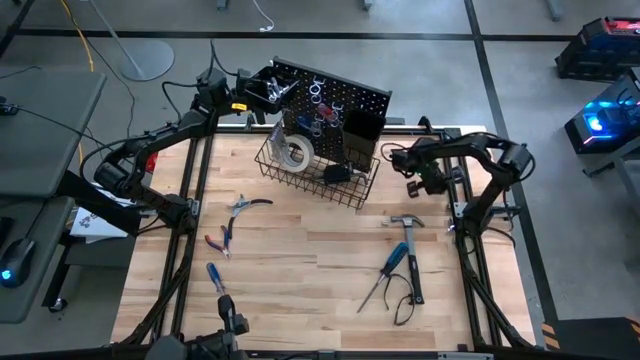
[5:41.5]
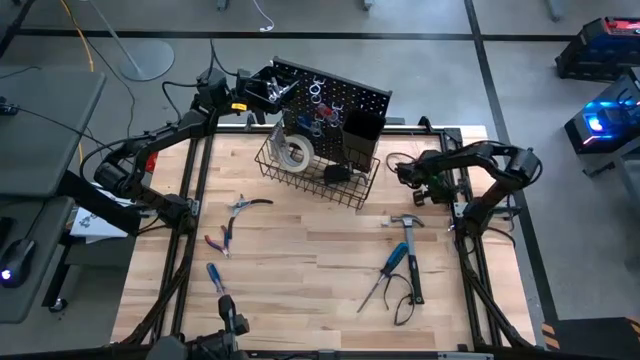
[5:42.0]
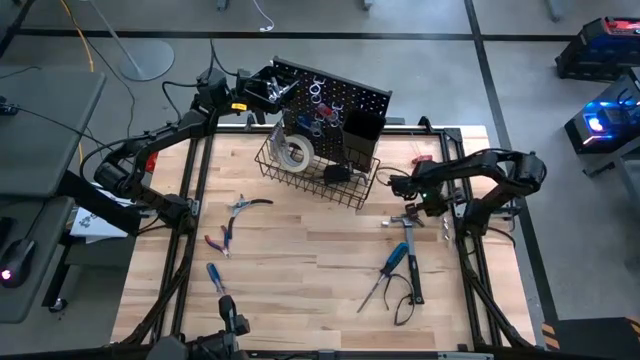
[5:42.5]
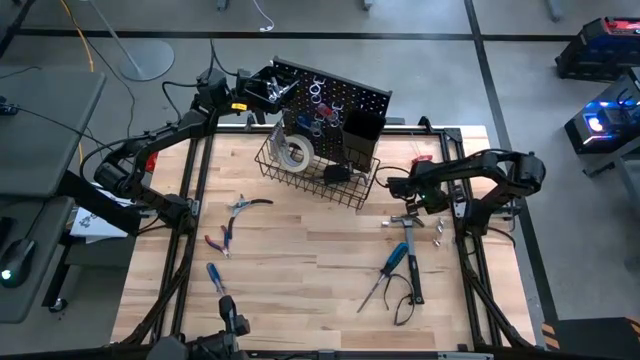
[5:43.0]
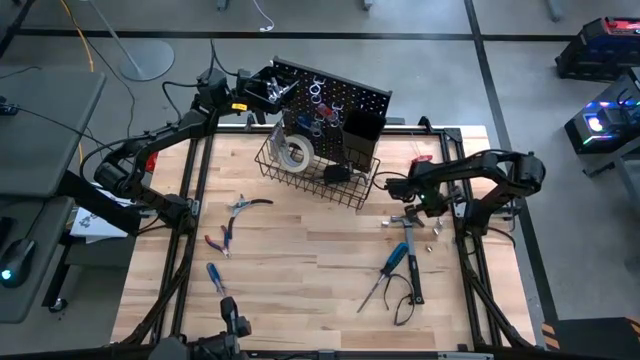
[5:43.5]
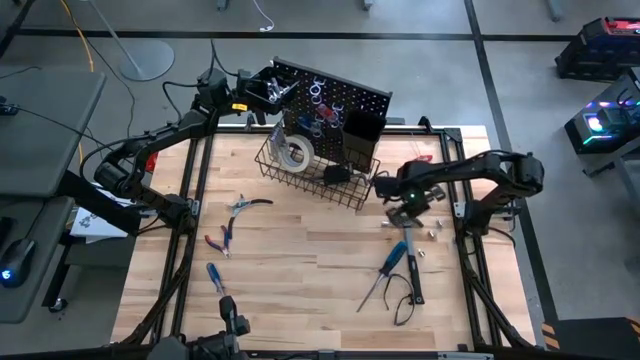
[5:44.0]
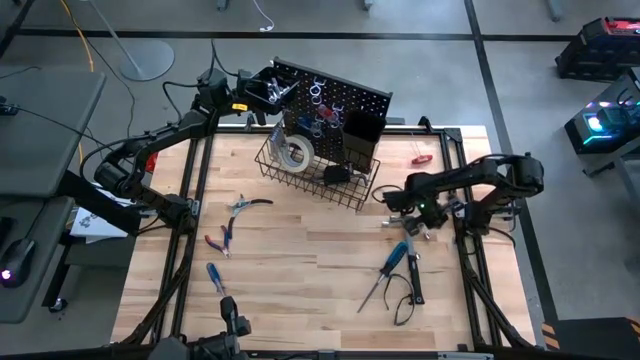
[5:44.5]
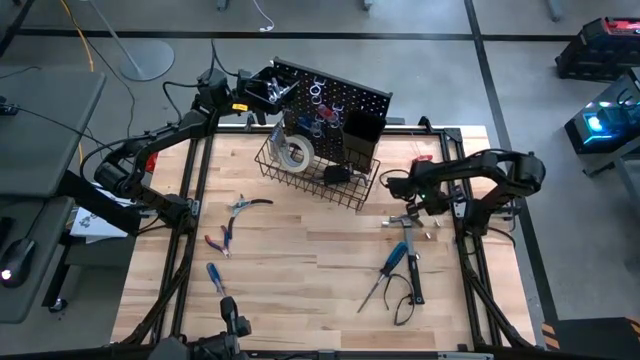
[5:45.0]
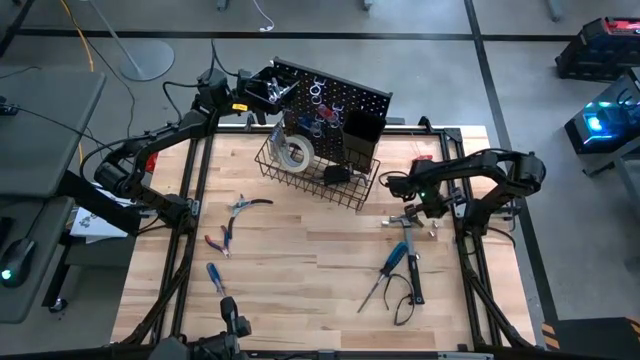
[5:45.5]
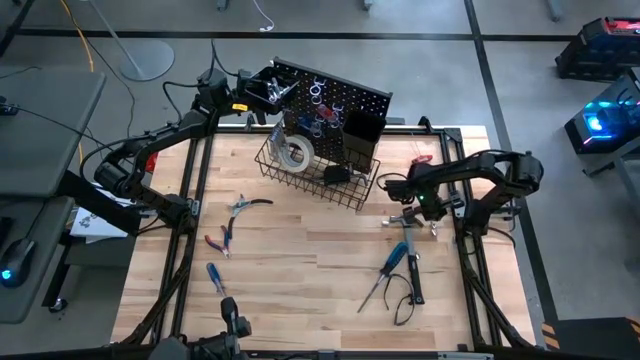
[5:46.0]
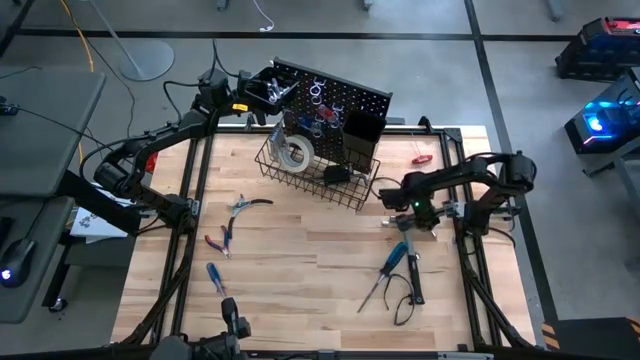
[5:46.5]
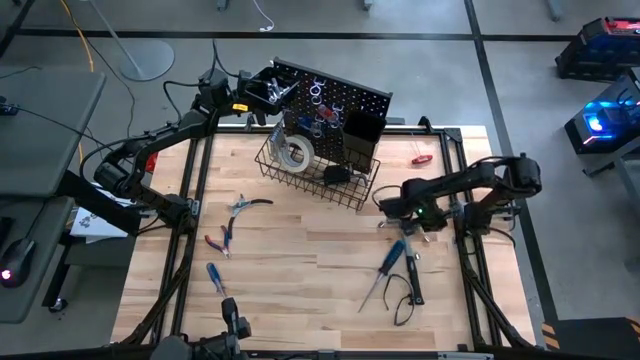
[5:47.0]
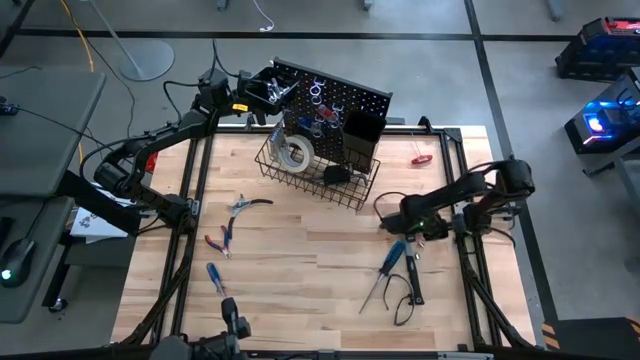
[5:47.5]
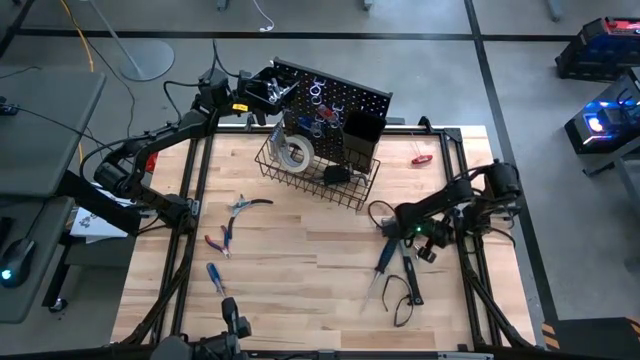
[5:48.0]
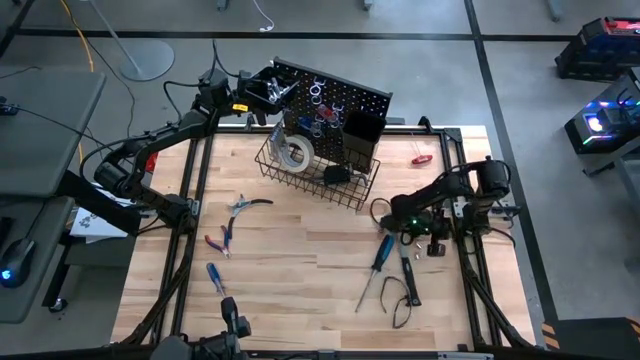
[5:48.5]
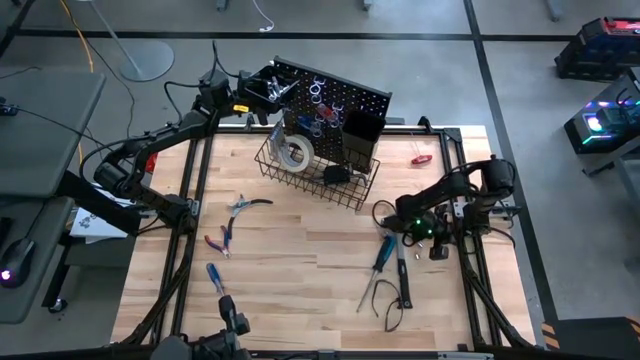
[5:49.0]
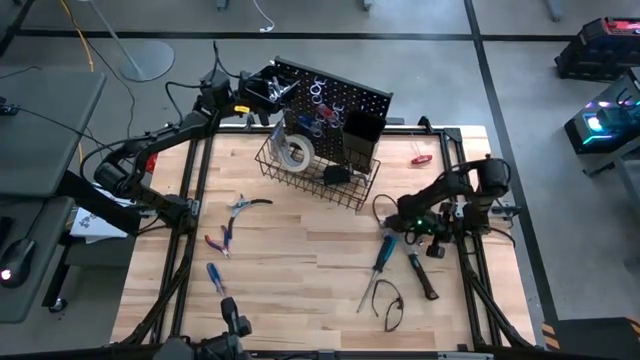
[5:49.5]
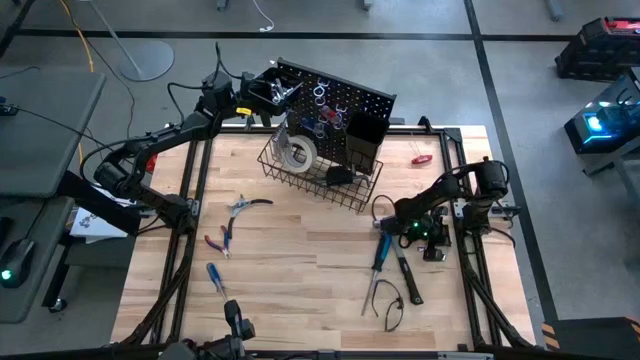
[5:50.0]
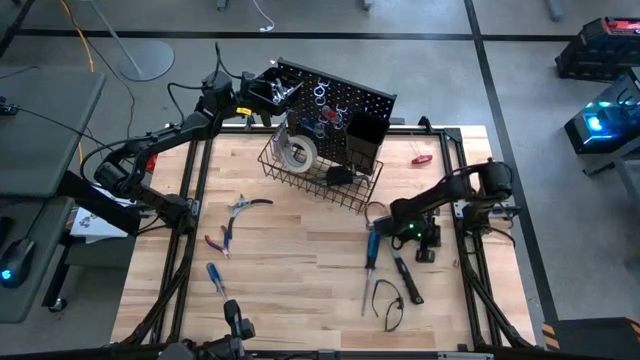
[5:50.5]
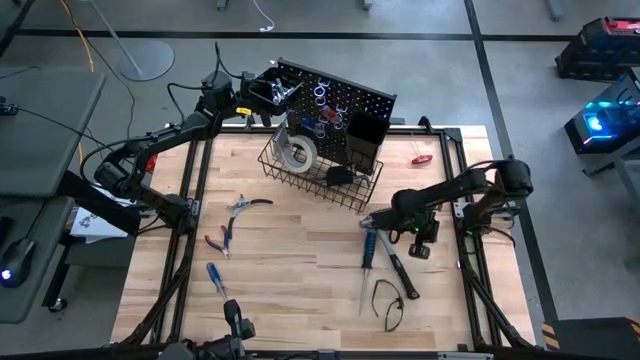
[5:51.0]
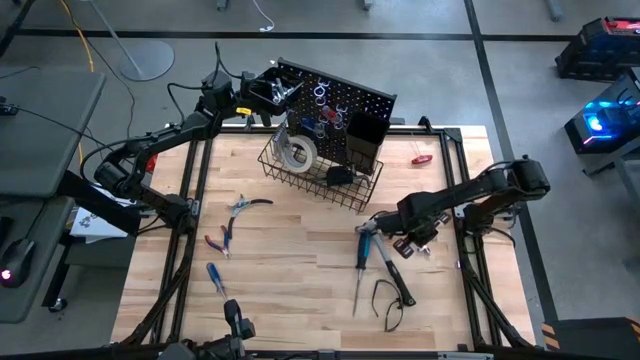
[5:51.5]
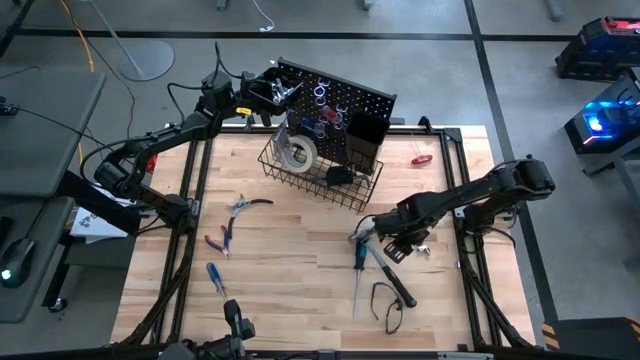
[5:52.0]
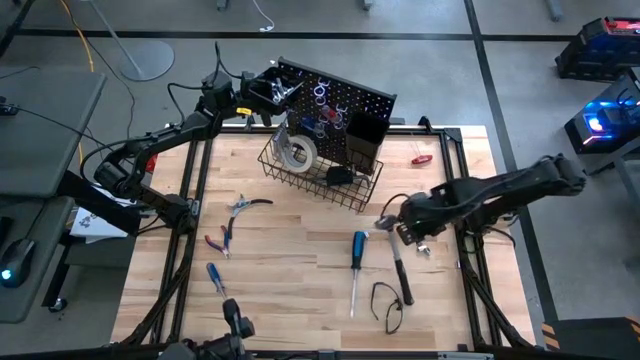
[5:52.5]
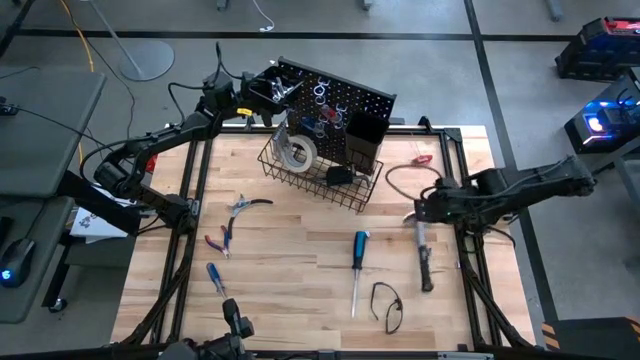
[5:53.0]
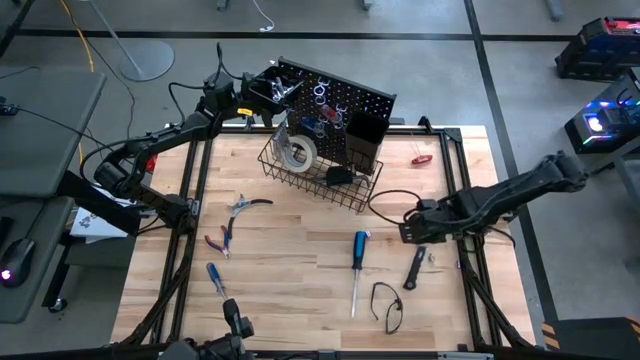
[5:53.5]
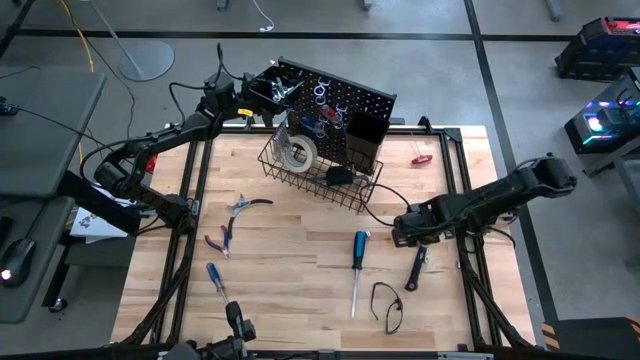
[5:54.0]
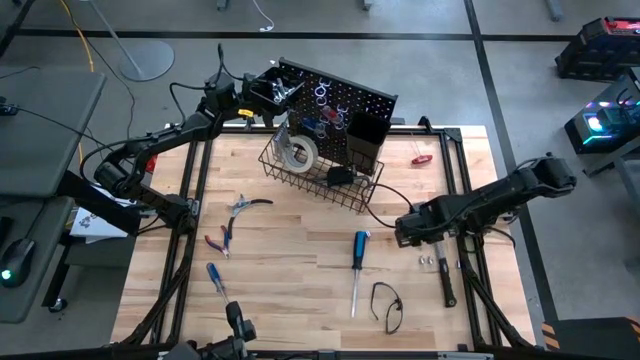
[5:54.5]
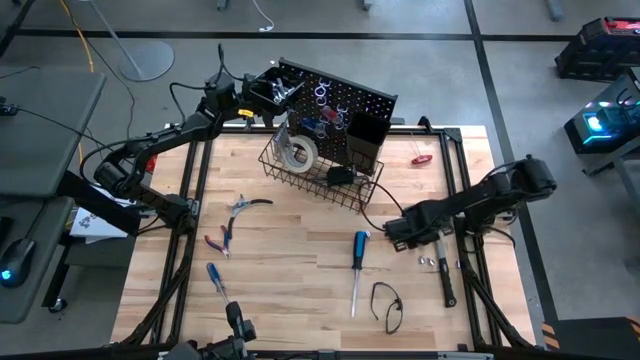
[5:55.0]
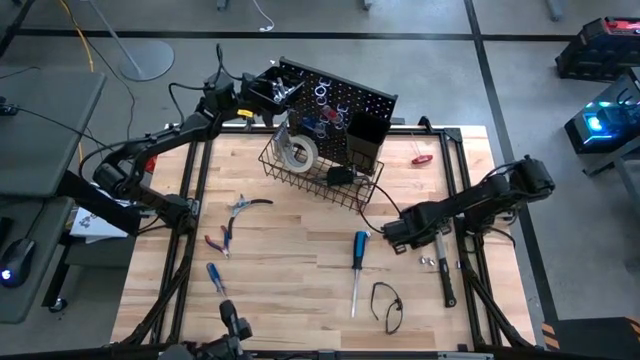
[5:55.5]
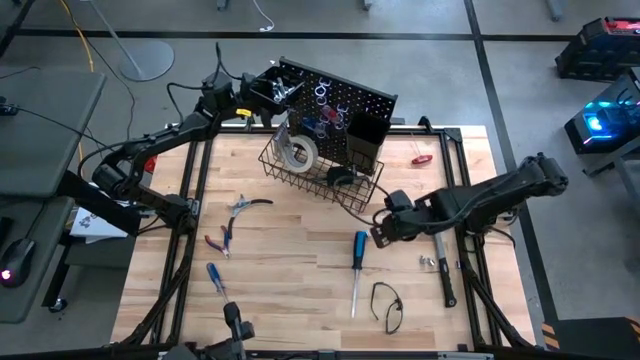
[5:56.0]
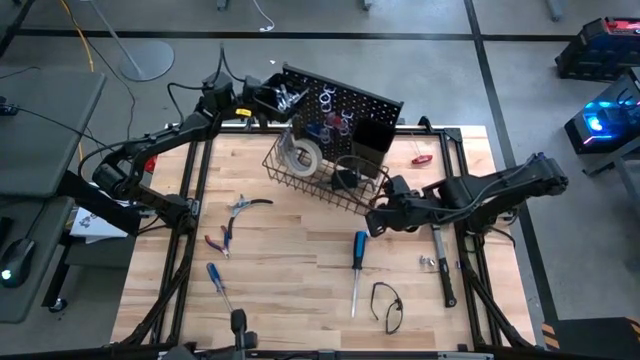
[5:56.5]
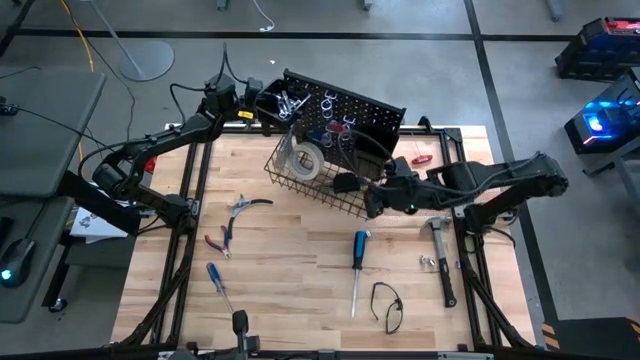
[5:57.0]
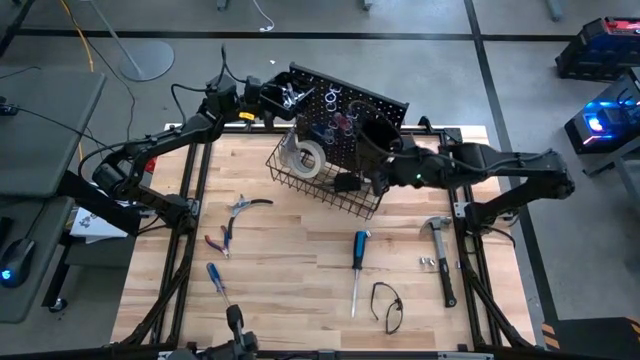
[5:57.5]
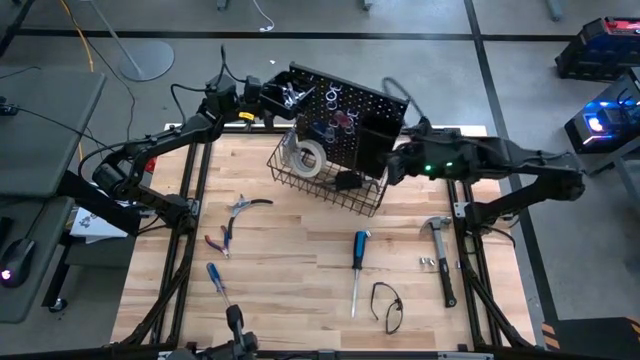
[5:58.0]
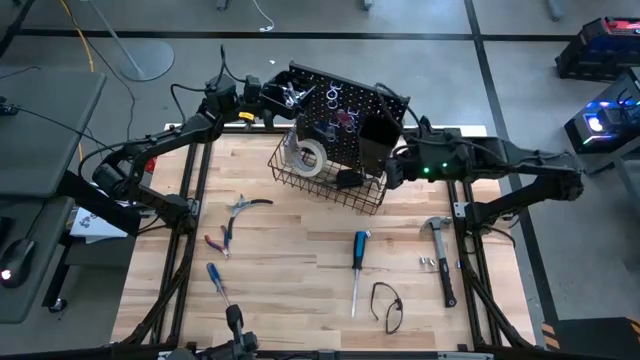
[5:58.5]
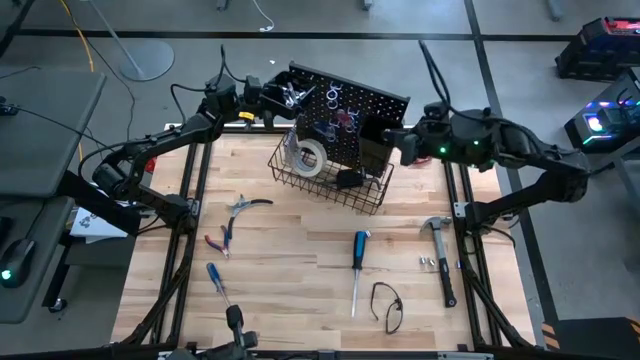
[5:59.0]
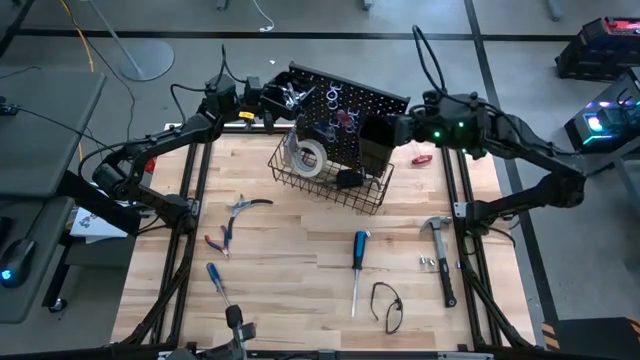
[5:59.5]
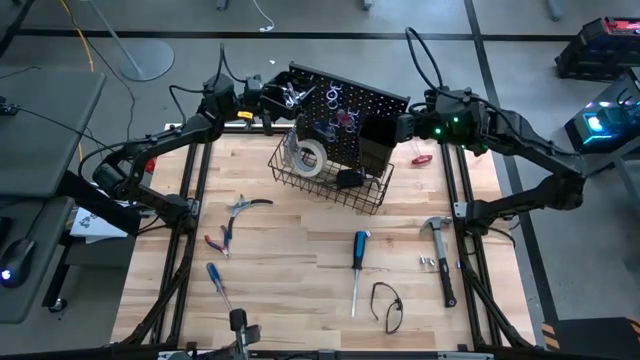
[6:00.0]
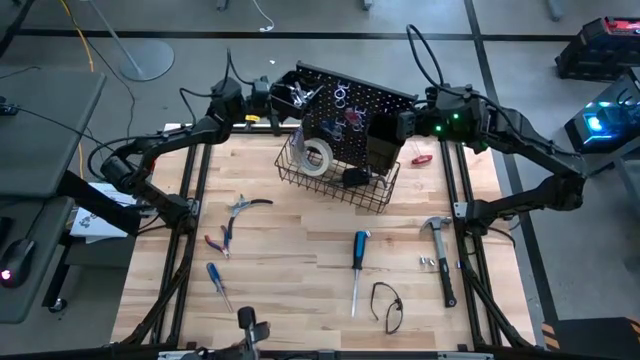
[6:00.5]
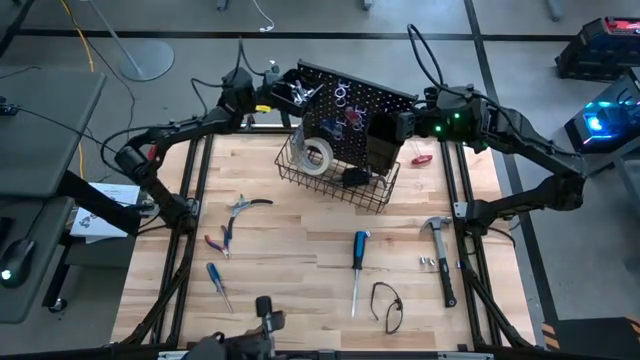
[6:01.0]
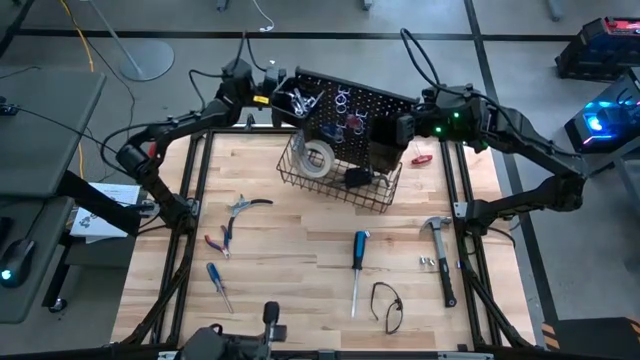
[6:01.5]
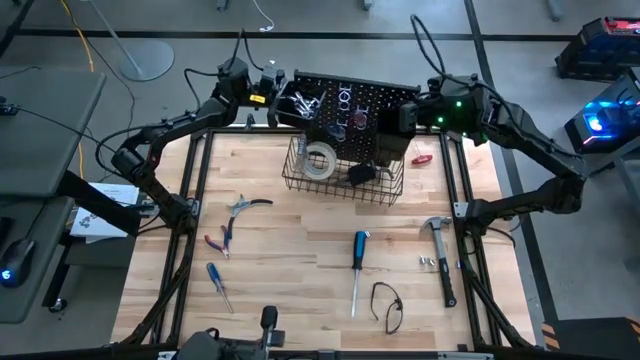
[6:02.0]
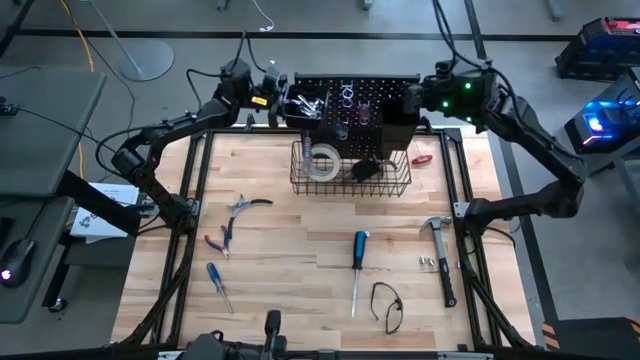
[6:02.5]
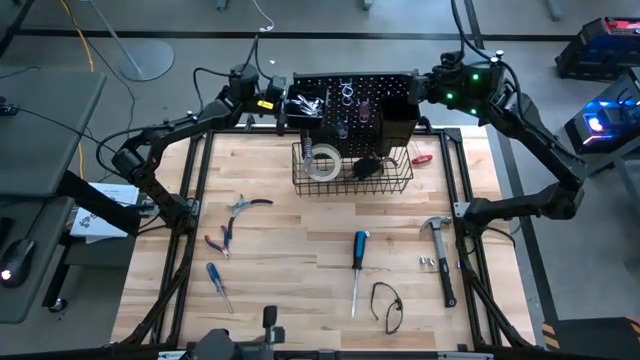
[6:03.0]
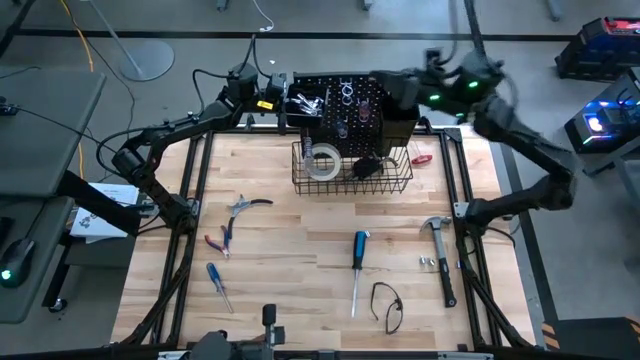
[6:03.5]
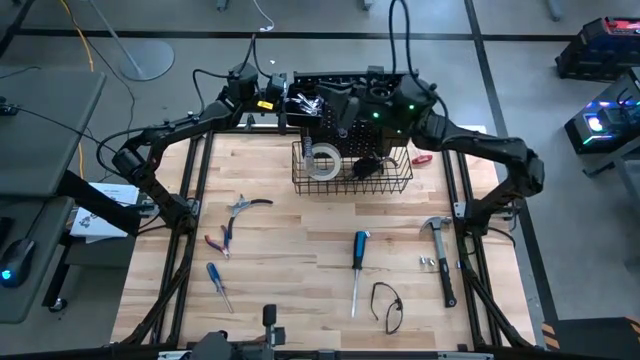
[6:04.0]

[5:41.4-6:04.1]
Task: Hang tools onto peg board
Put the socket in the left black bin on the pegboard
